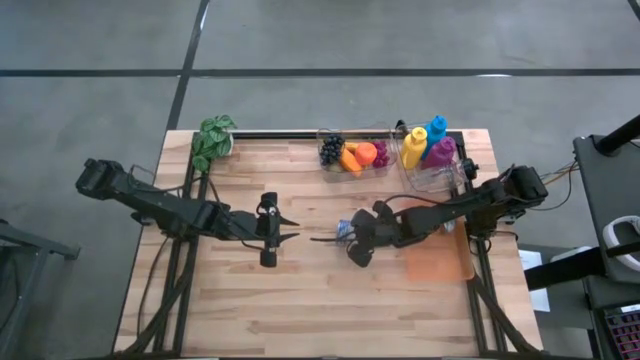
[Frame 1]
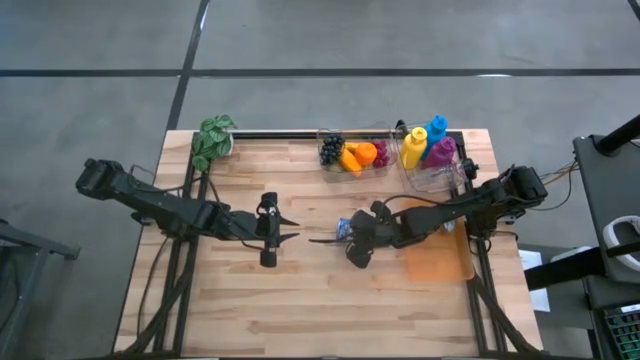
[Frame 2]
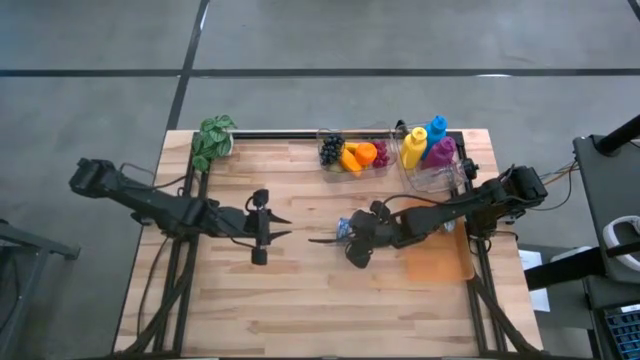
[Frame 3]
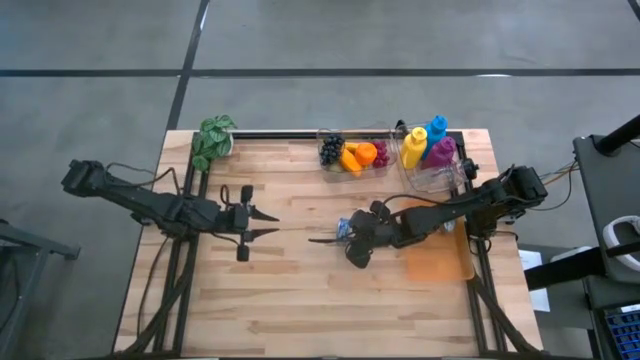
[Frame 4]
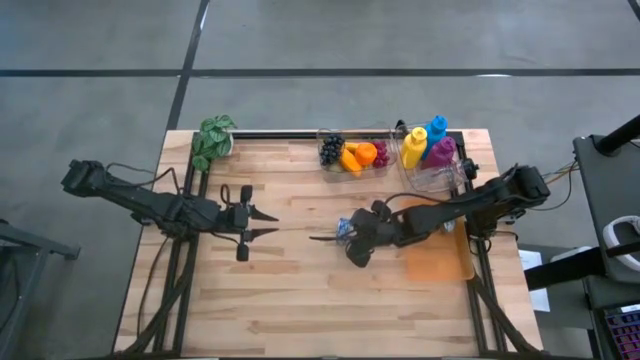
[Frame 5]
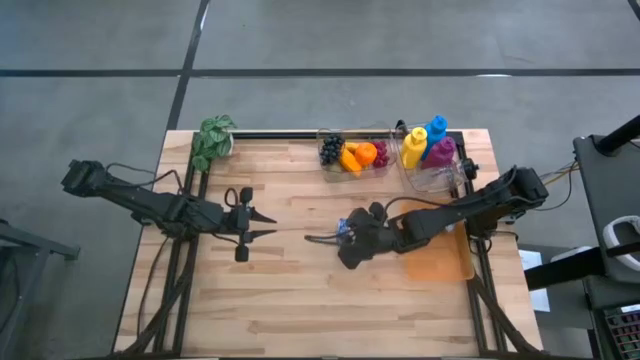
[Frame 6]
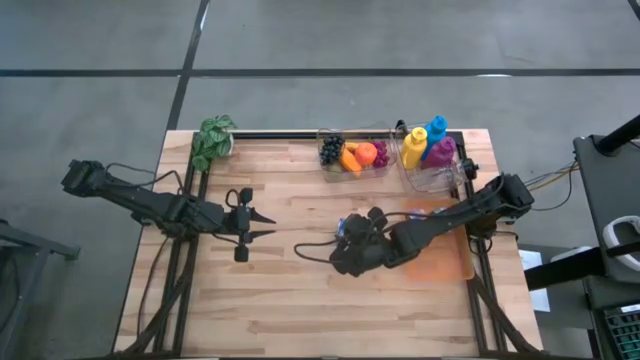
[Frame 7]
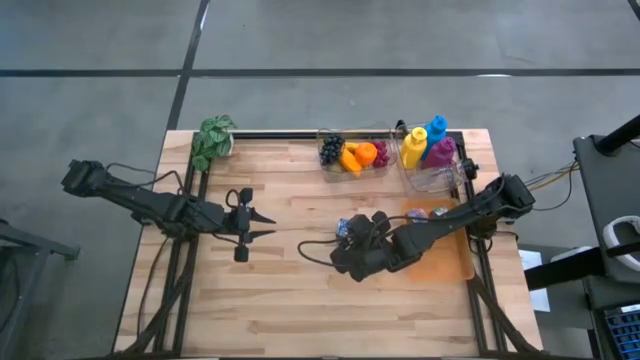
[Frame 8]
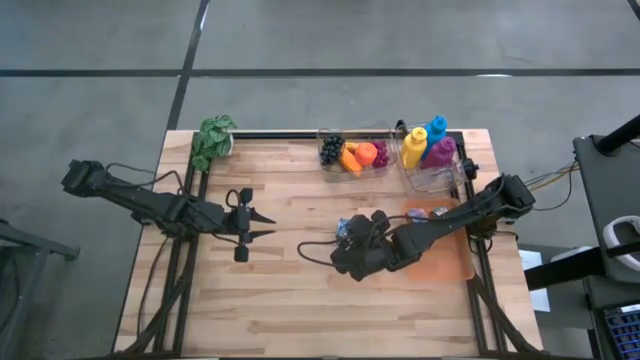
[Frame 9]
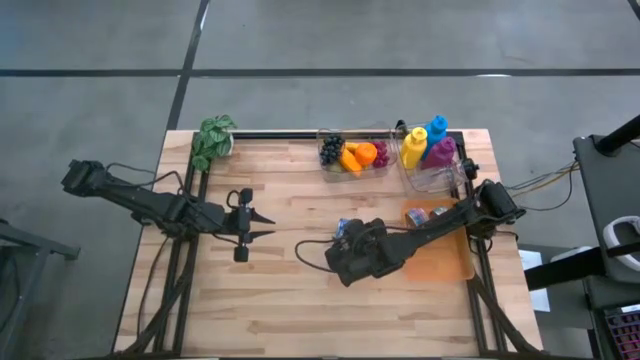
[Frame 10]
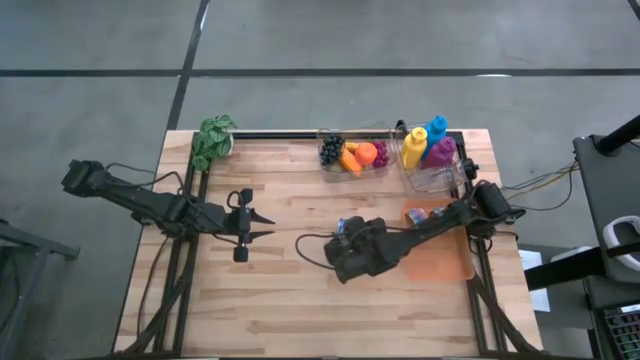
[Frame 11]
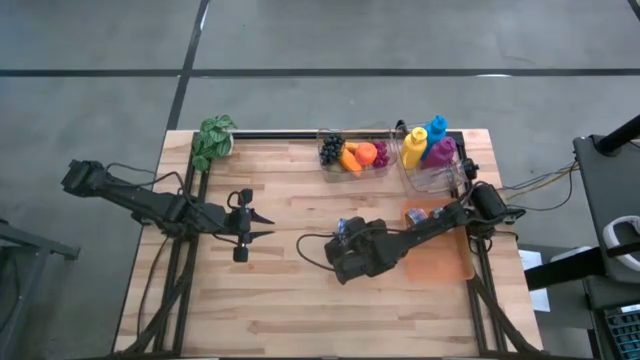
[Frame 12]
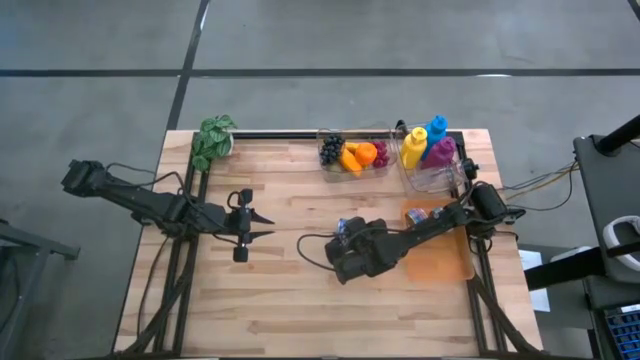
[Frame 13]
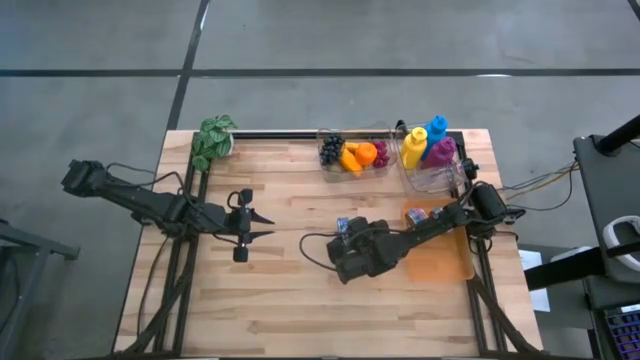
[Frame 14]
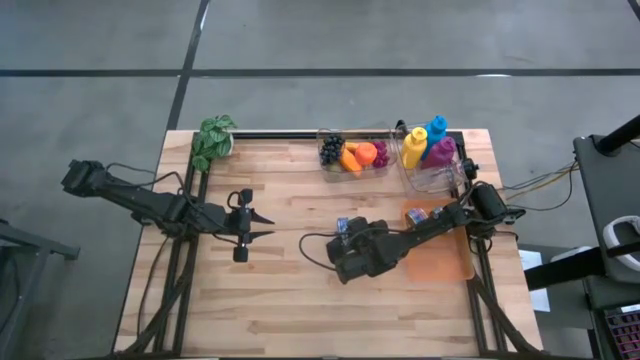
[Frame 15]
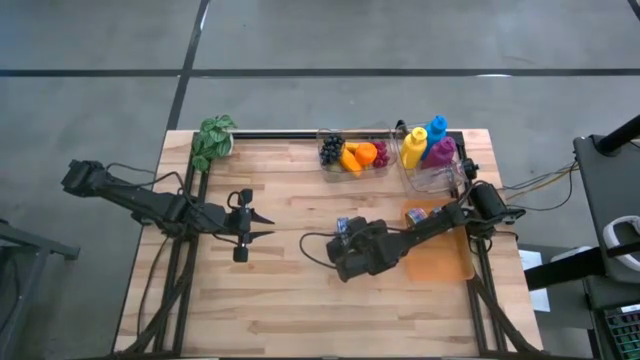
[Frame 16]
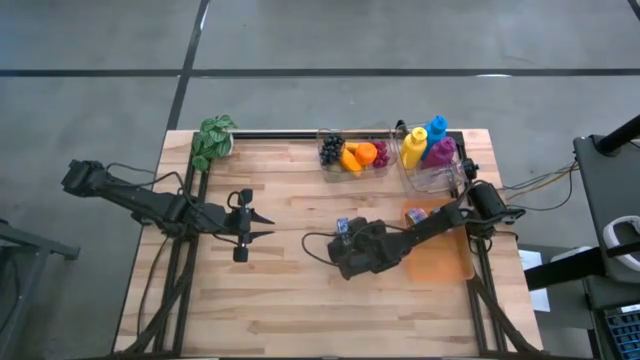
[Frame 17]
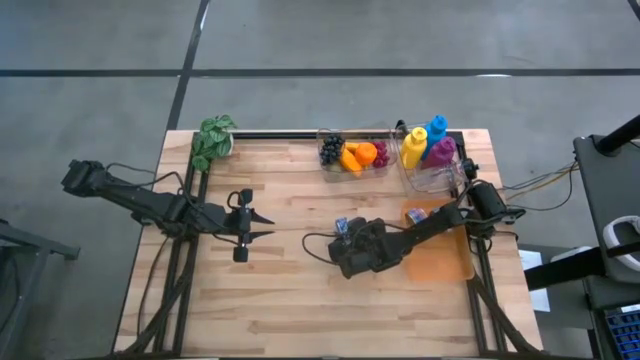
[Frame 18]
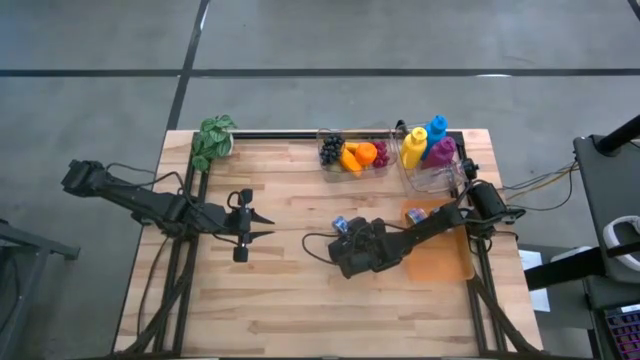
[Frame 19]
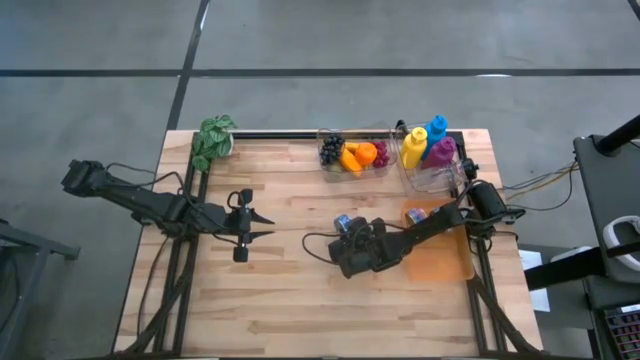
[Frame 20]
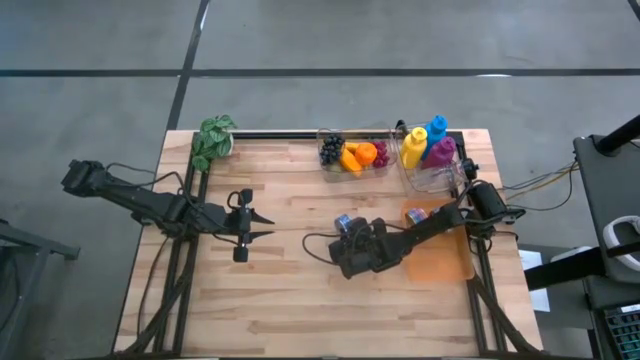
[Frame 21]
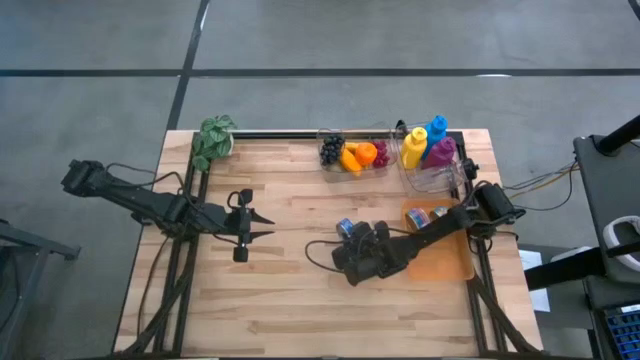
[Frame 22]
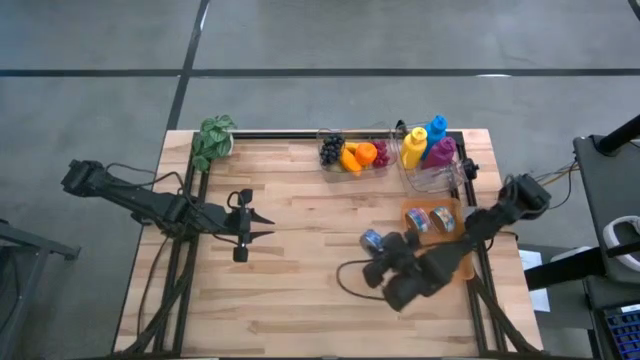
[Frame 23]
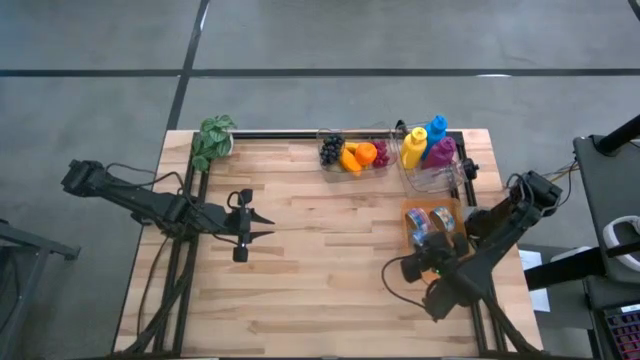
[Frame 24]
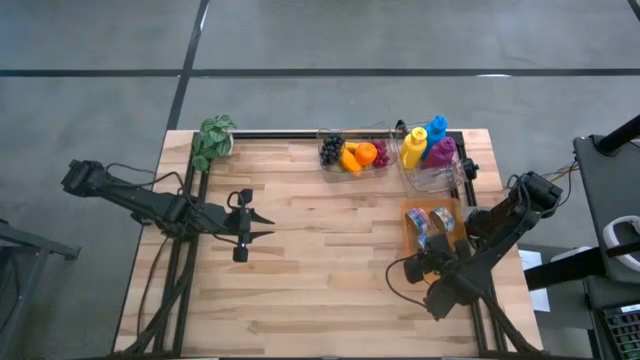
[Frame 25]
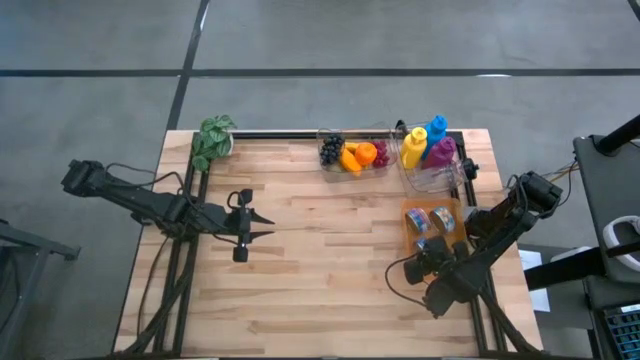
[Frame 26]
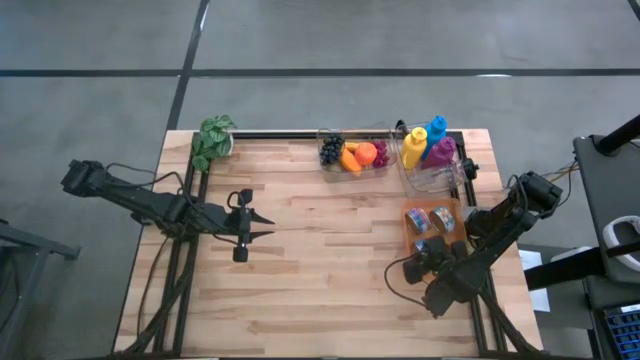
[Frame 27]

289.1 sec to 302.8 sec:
Task: Pick & Place Food Item
Put the blue tuna can into the orange bin

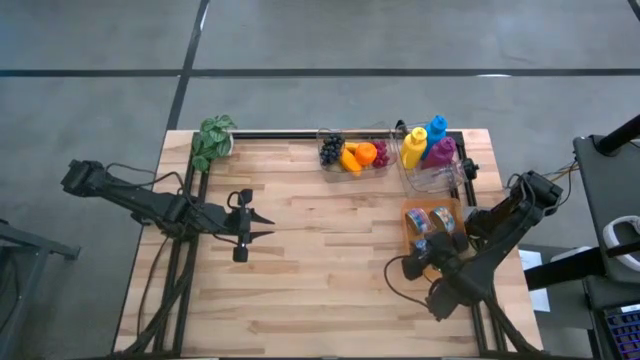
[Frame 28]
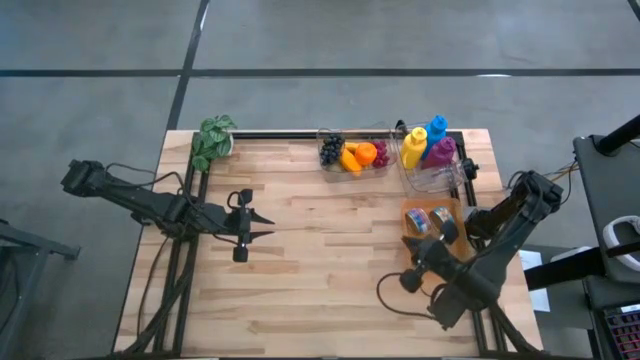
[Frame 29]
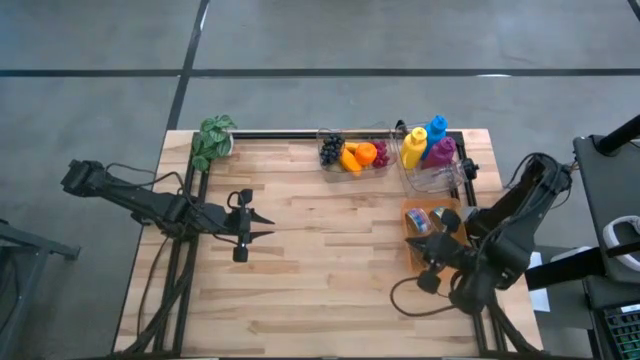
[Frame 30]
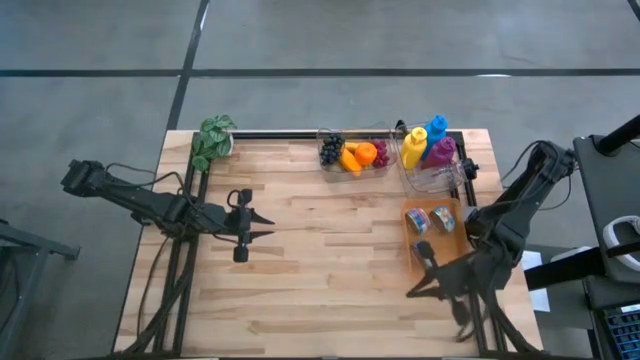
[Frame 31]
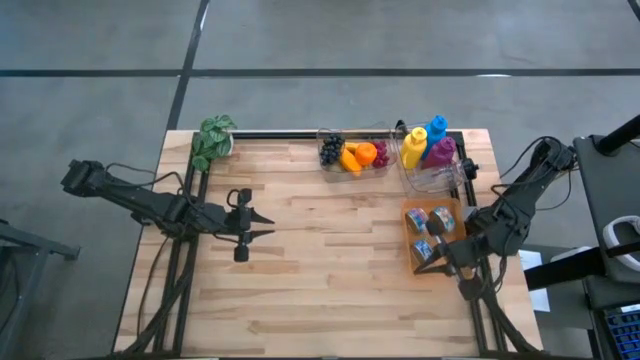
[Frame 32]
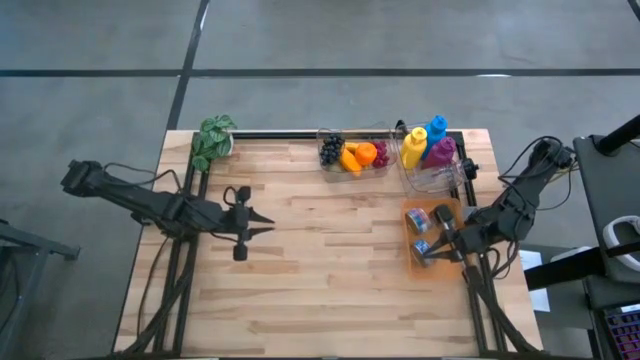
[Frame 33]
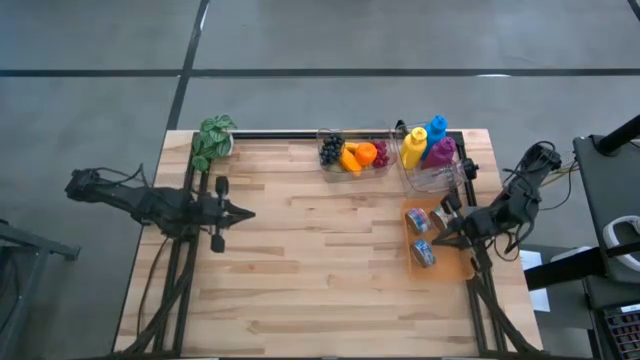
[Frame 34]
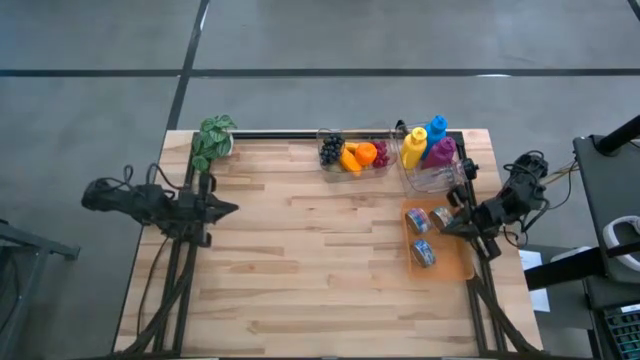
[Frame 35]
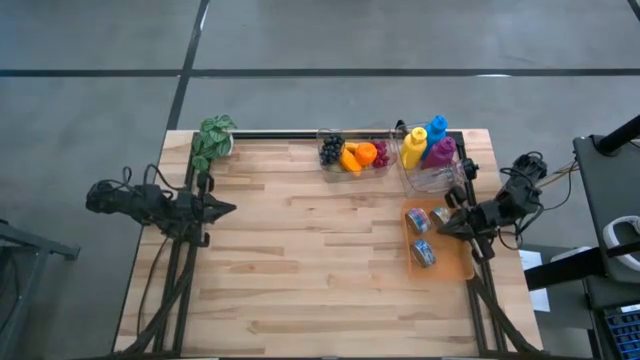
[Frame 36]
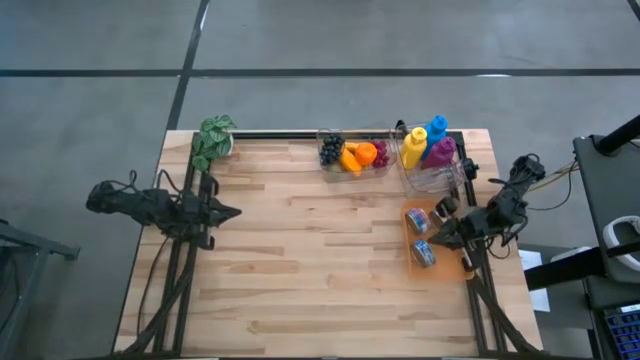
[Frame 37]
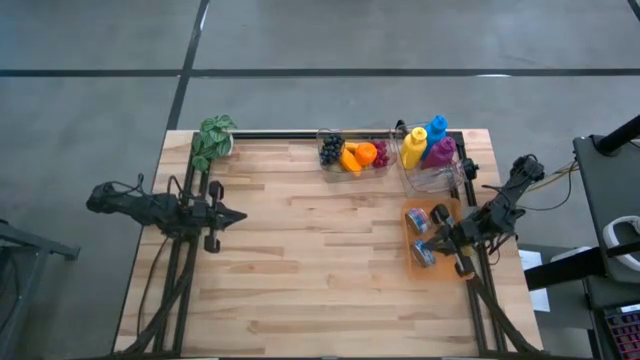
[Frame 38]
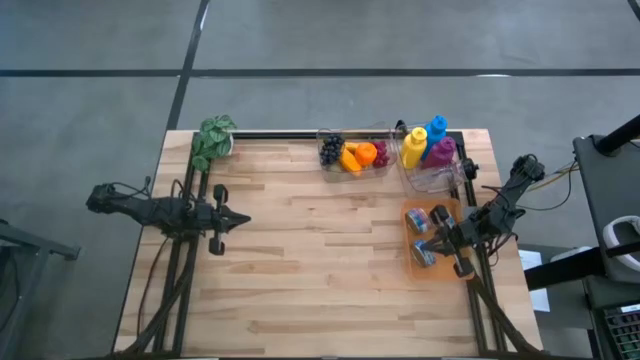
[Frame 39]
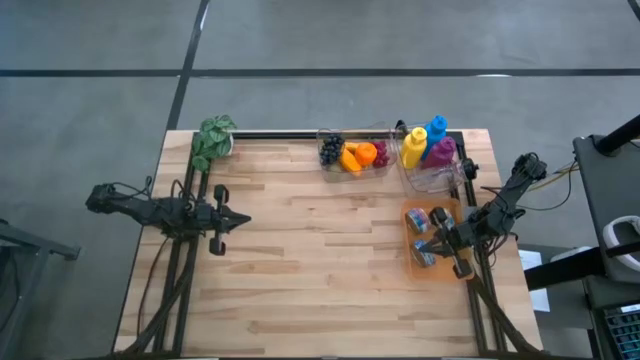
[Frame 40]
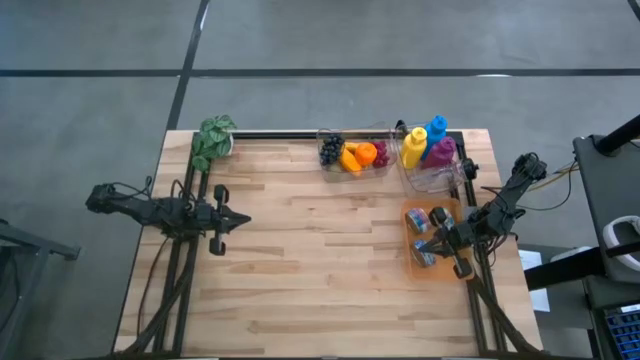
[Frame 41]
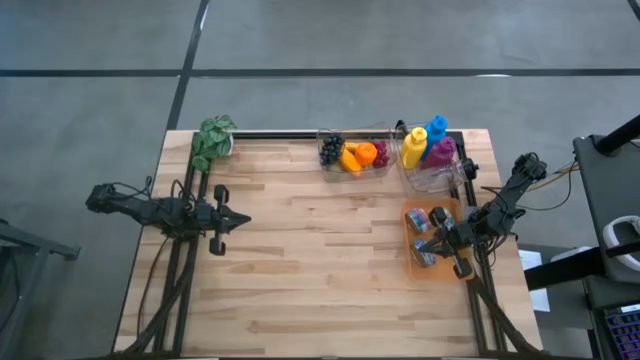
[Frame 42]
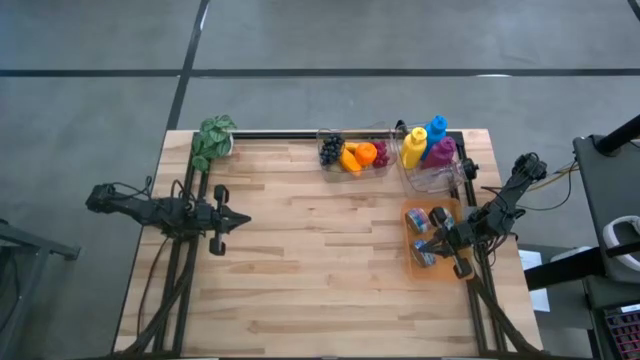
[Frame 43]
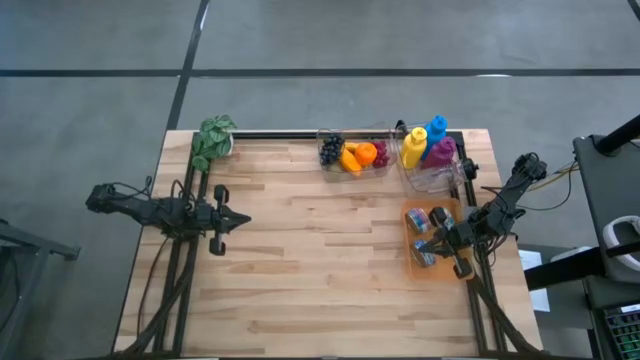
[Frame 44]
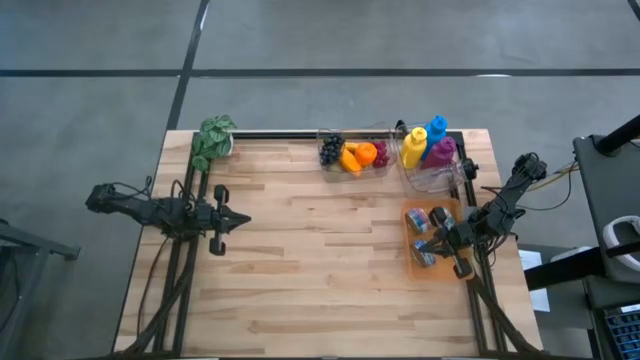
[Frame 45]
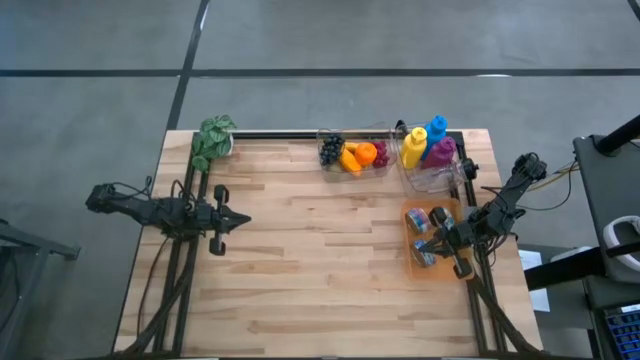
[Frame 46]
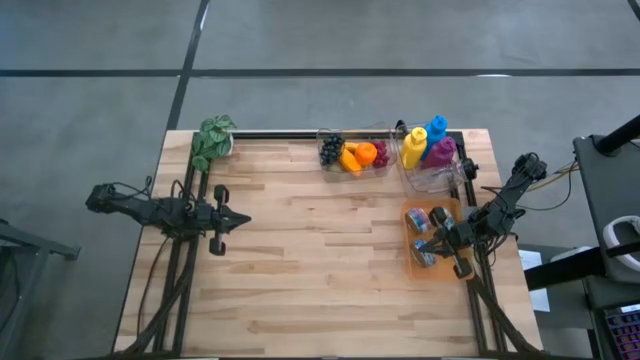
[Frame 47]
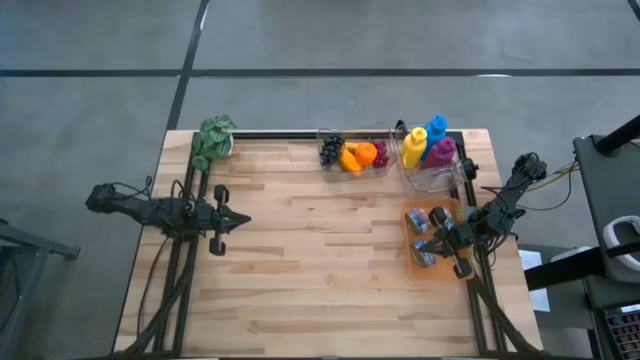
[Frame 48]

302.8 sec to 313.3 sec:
Return to Home Position
